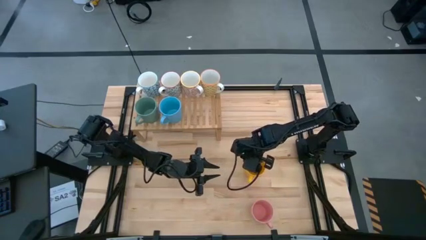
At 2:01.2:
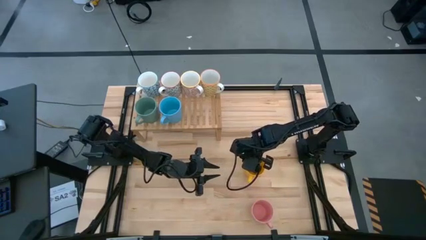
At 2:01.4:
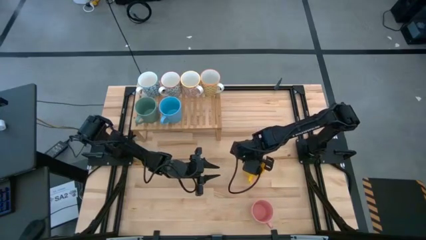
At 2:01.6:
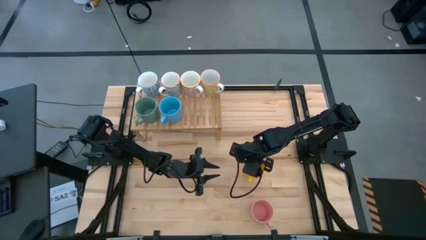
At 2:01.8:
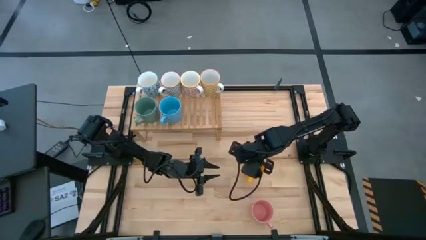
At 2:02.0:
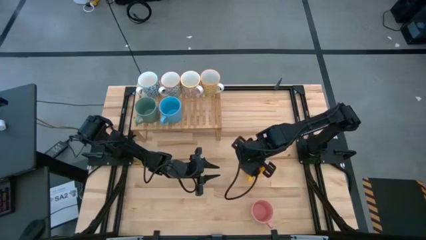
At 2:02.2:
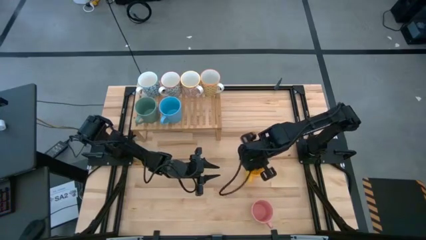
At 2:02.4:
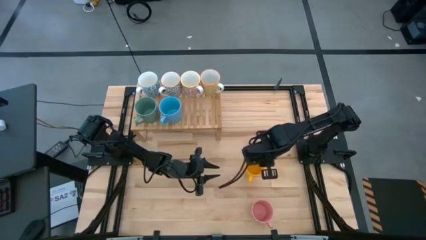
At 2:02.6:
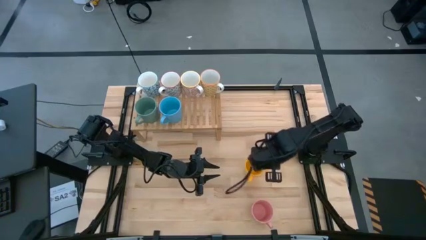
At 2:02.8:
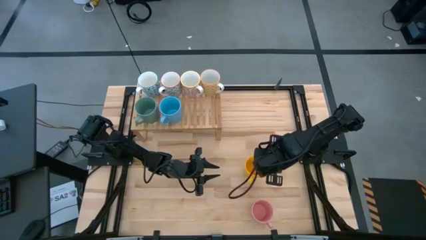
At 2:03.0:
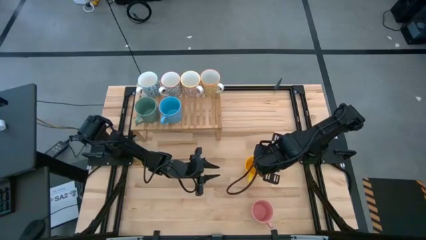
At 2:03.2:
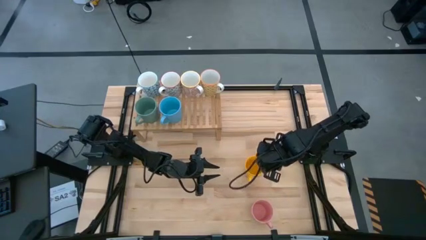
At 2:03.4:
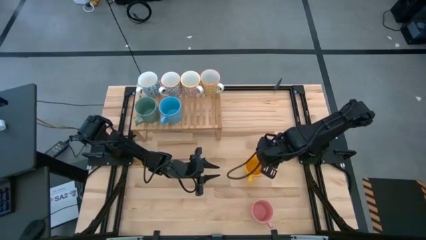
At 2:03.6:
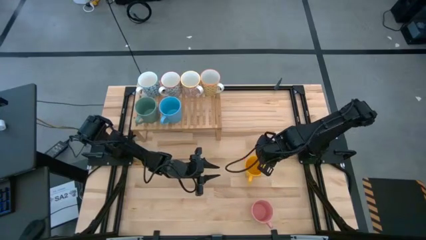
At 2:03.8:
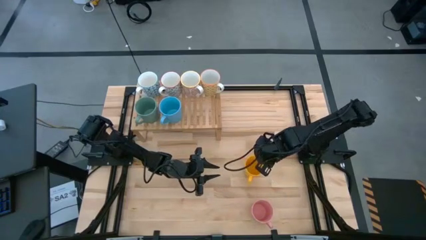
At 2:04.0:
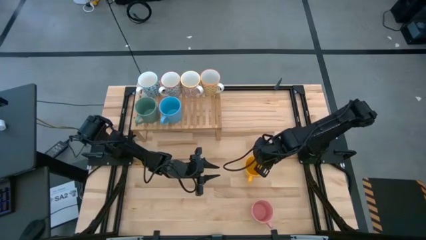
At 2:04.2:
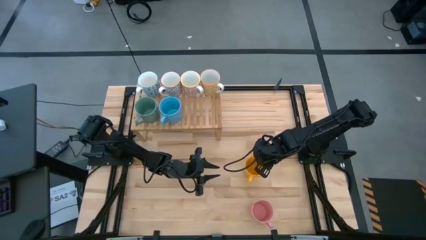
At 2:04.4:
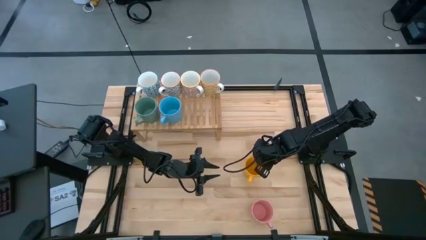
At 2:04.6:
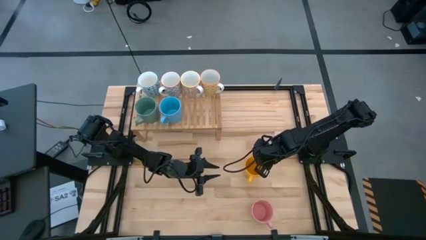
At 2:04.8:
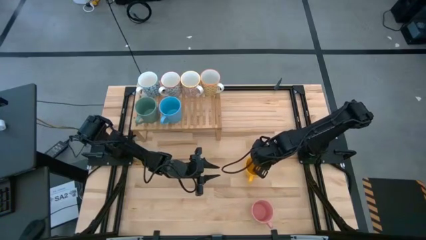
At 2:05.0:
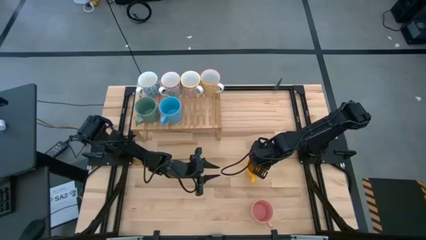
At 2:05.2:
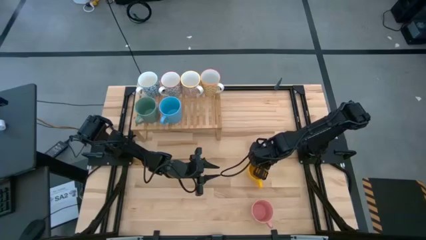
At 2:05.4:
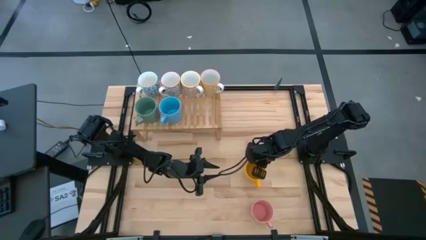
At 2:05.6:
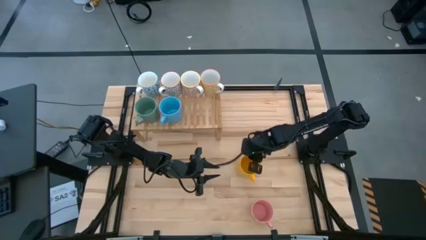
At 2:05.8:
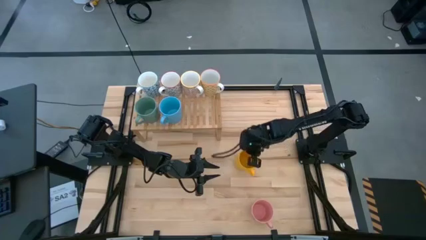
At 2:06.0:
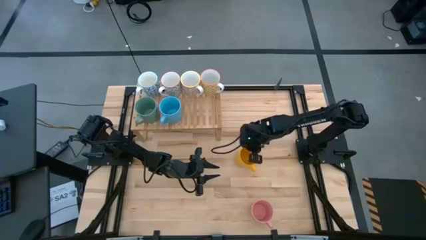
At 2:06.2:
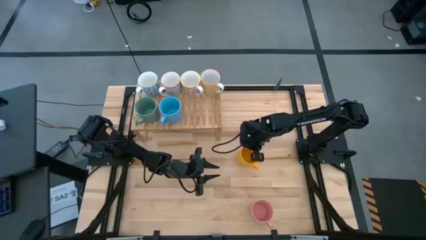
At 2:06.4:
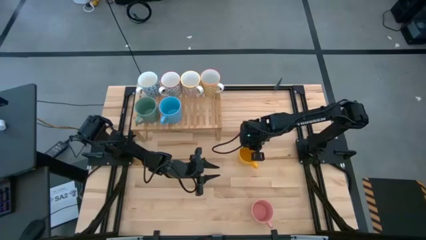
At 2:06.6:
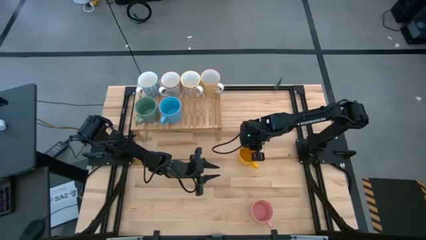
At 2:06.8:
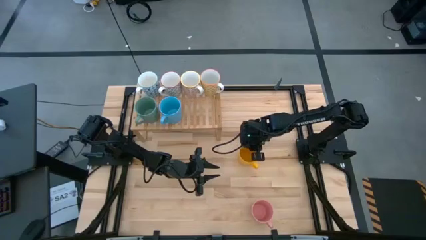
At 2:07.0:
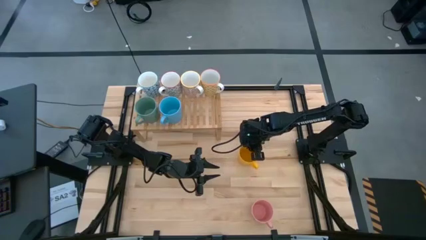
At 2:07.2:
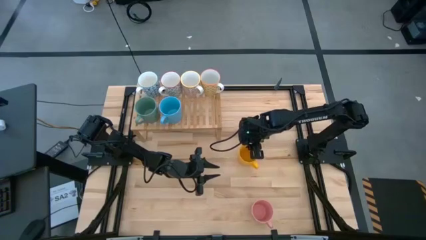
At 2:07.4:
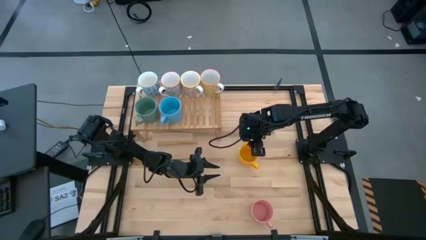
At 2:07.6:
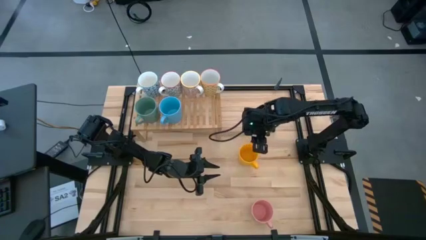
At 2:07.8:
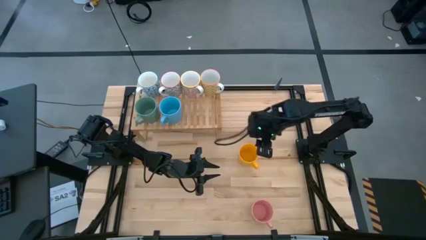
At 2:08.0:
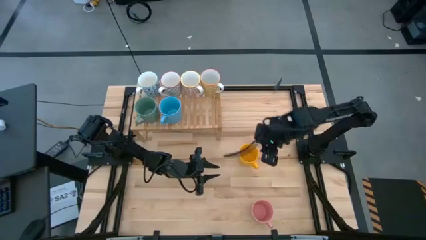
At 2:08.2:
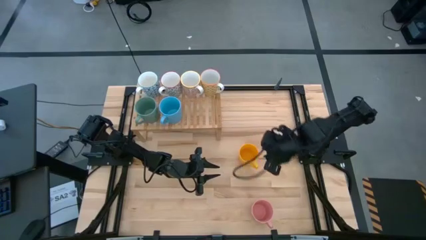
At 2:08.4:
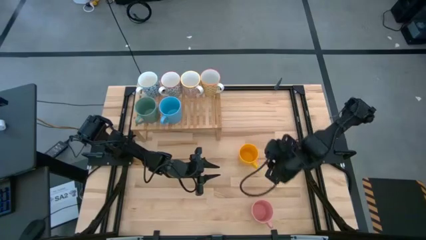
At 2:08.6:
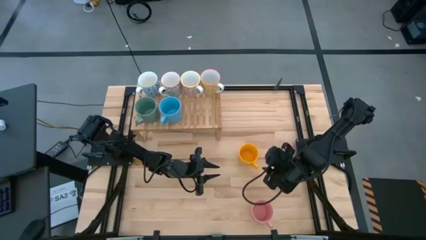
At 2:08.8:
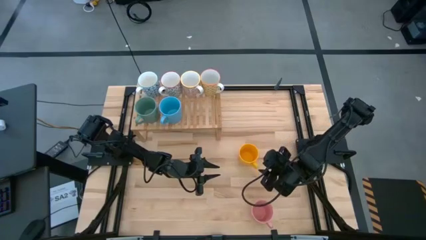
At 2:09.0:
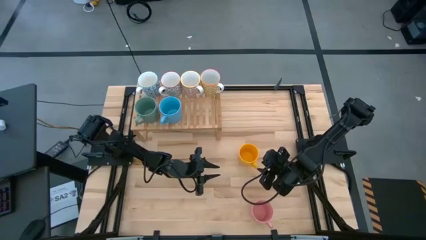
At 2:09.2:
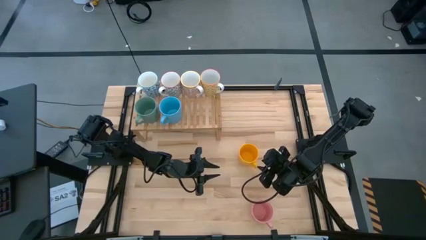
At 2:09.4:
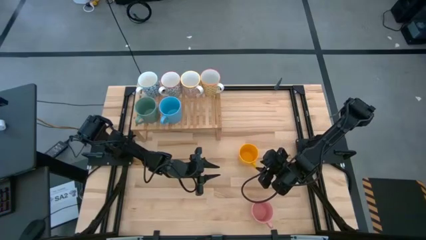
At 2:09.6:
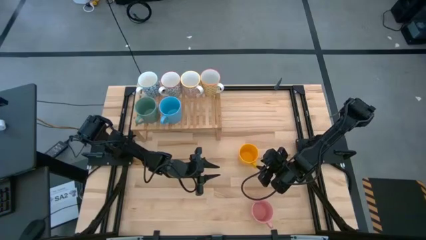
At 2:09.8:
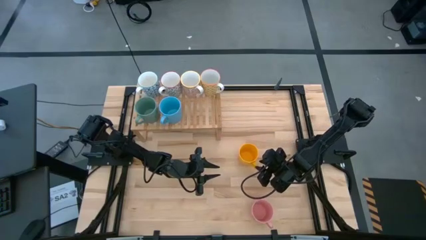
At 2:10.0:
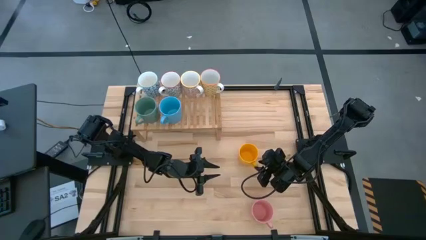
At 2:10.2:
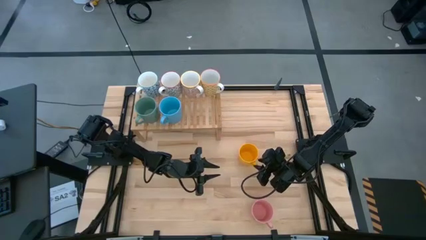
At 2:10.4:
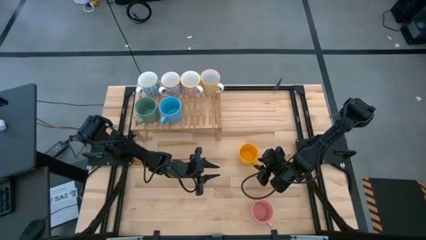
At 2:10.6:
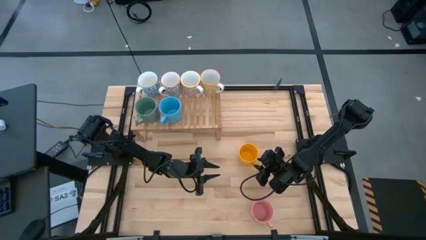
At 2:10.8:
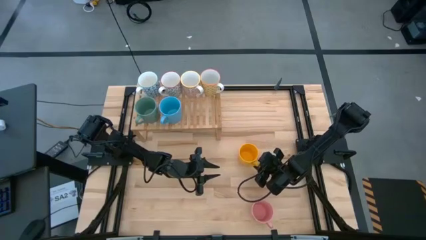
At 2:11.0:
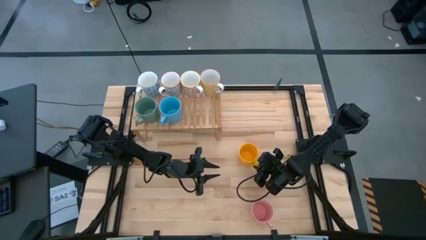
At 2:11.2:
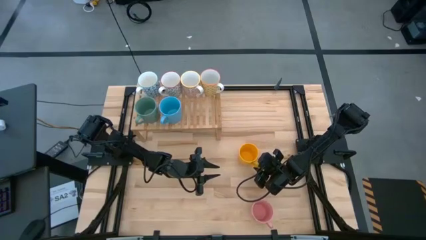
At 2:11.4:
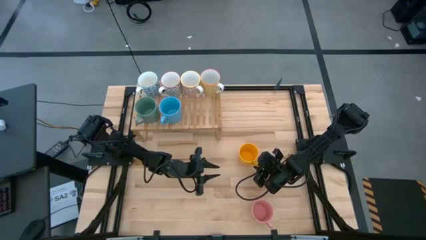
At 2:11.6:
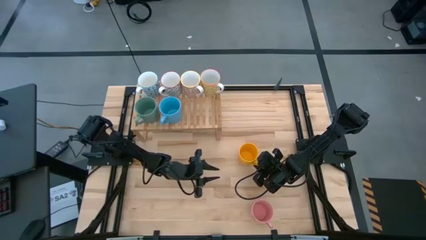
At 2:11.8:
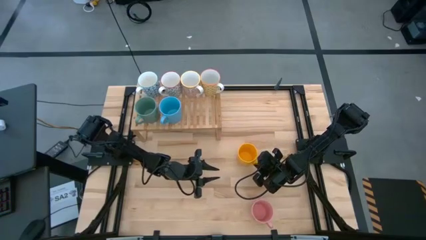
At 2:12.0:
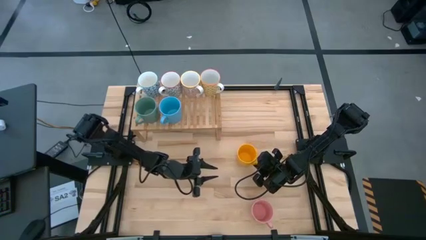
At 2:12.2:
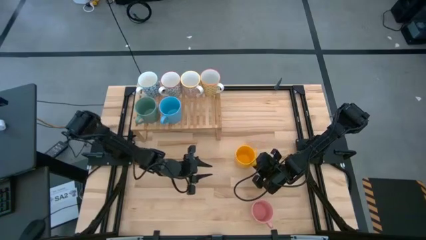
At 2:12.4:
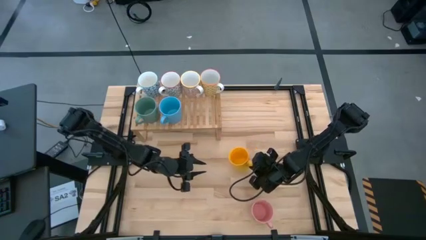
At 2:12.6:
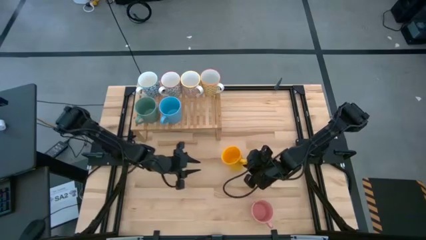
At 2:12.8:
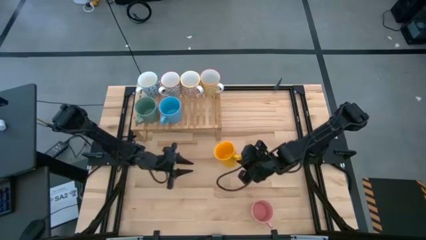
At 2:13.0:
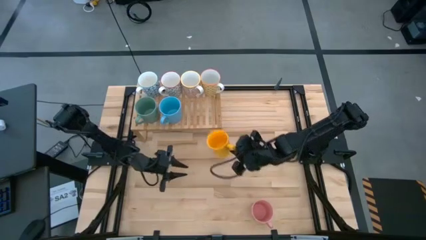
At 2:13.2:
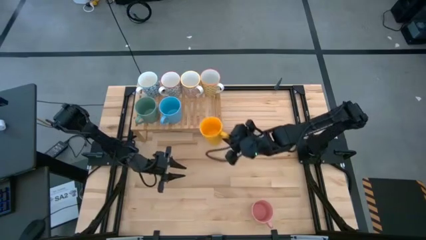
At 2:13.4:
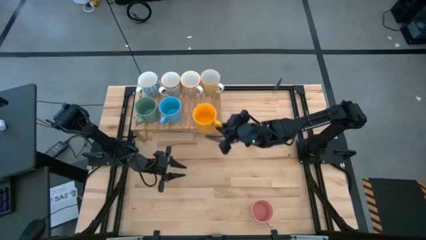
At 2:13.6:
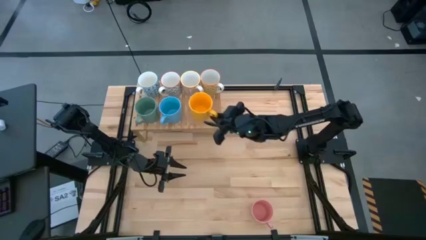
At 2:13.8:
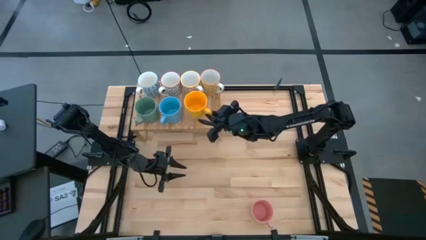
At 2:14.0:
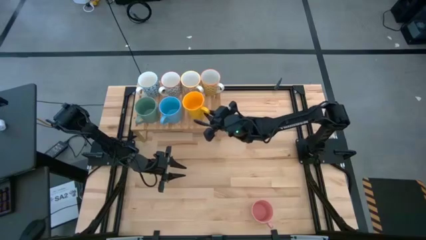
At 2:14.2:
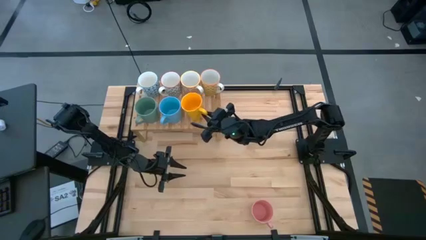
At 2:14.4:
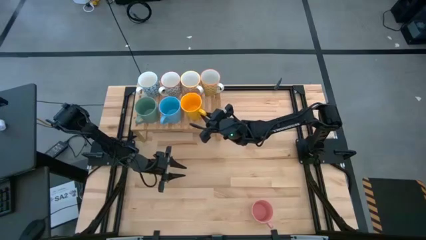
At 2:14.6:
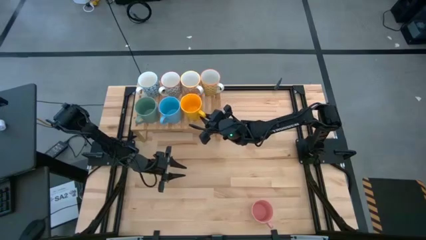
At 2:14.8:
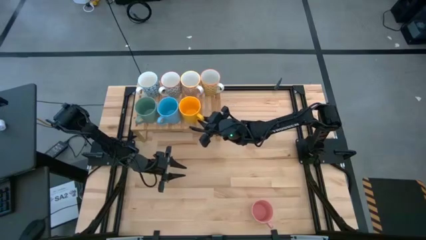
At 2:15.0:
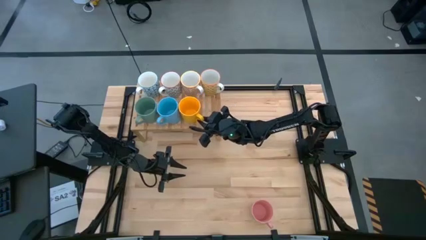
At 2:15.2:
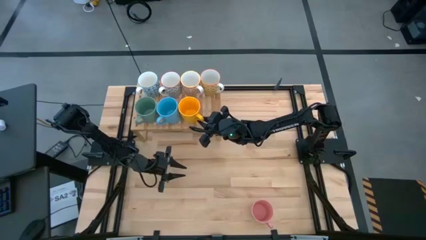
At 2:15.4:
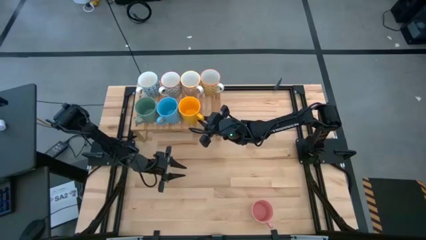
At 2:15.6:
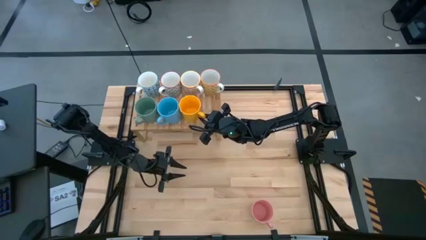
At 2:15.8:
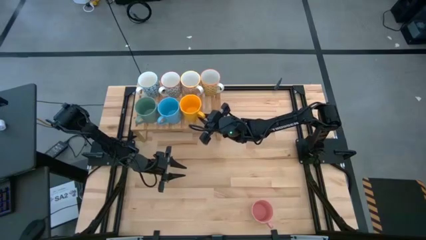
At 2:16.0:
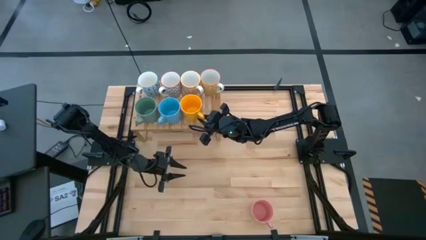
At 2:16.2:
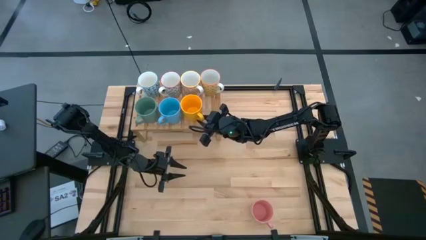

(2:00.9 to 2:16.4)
Task: Place coffee mugs
Put the yellow mug on the shelf
